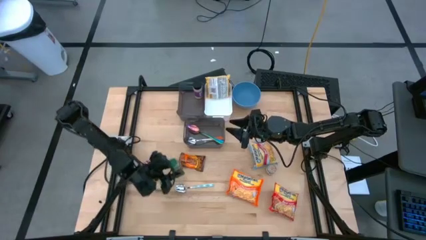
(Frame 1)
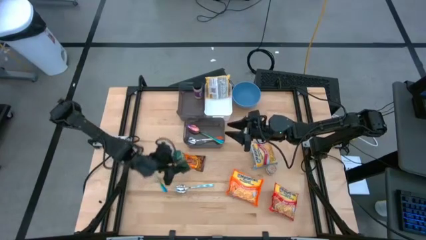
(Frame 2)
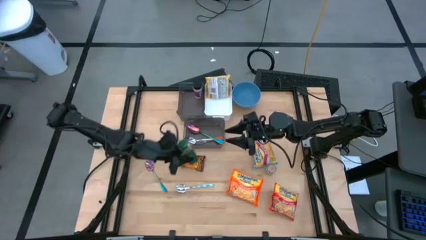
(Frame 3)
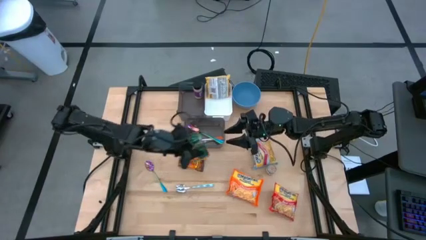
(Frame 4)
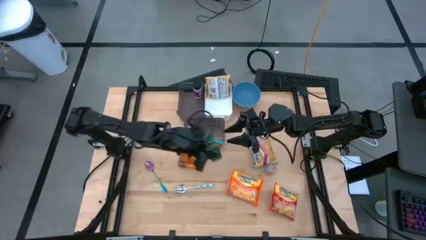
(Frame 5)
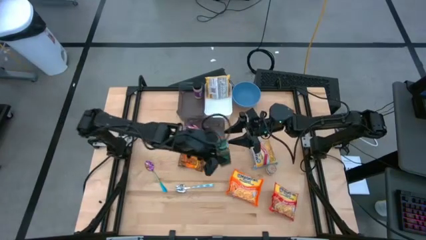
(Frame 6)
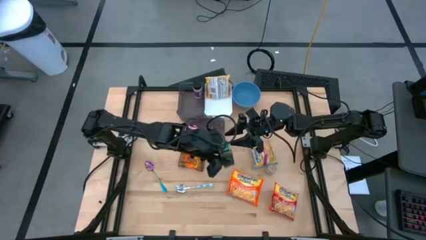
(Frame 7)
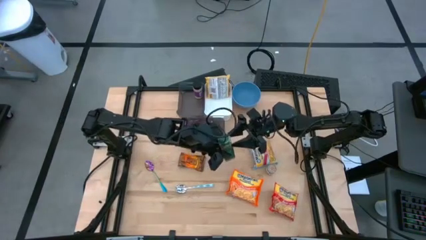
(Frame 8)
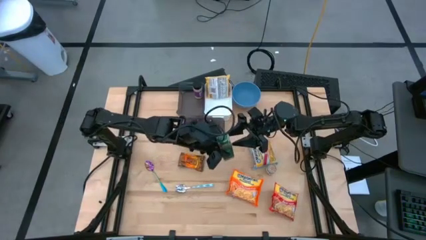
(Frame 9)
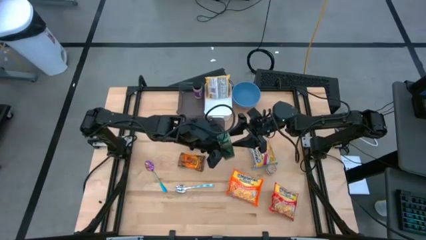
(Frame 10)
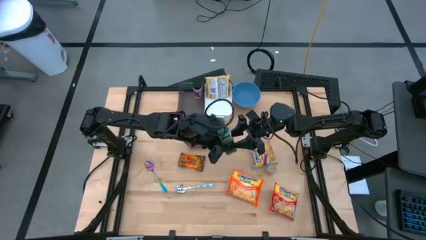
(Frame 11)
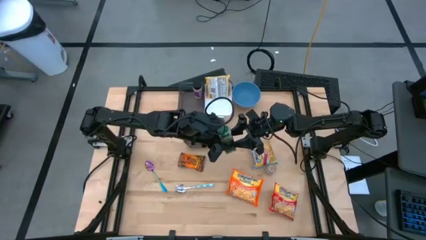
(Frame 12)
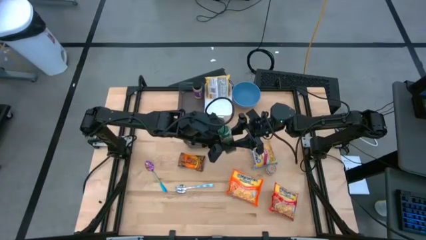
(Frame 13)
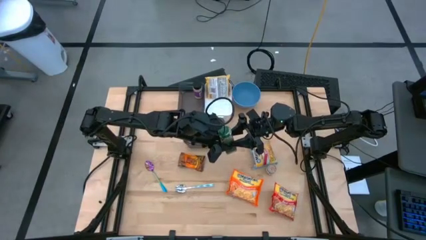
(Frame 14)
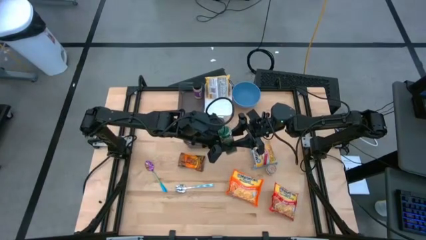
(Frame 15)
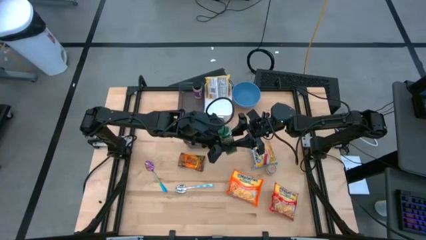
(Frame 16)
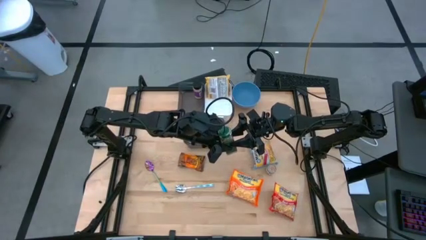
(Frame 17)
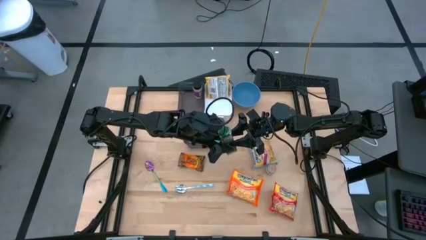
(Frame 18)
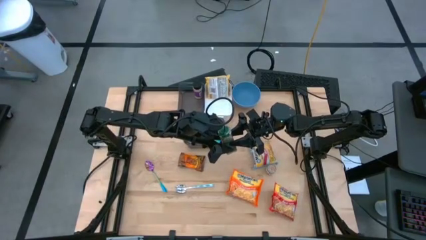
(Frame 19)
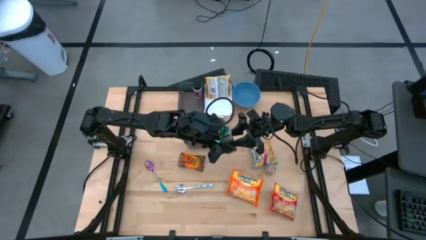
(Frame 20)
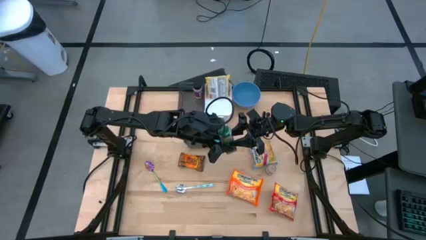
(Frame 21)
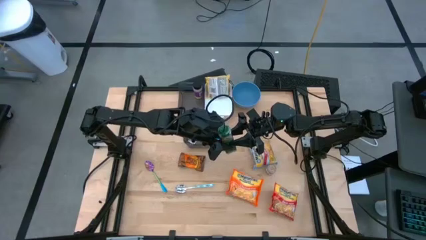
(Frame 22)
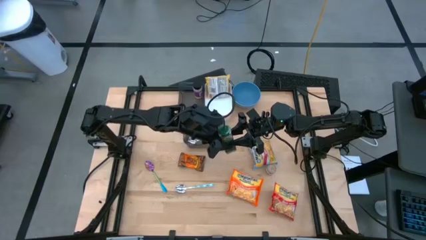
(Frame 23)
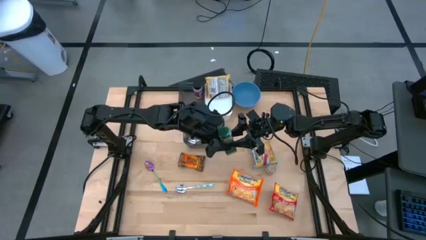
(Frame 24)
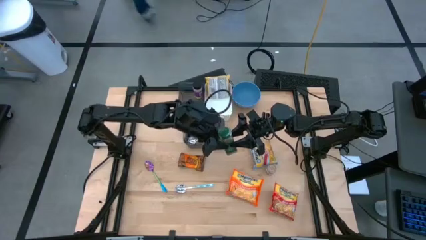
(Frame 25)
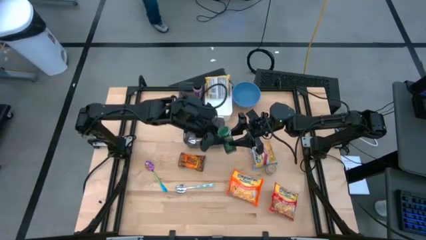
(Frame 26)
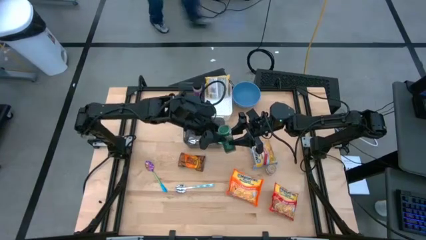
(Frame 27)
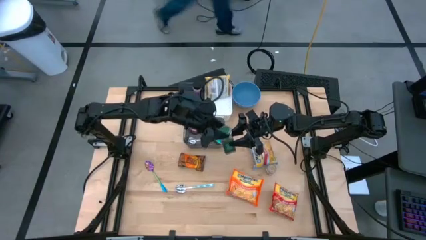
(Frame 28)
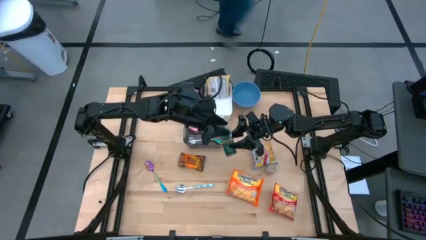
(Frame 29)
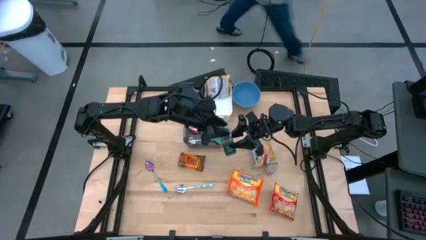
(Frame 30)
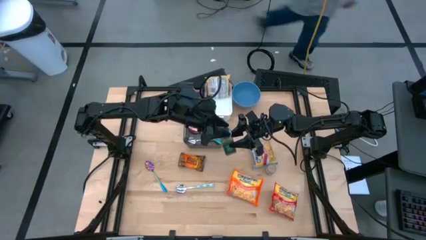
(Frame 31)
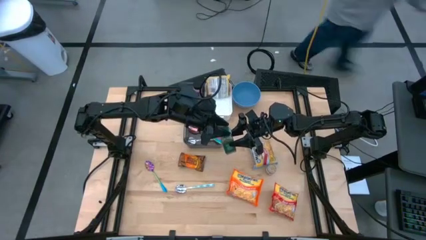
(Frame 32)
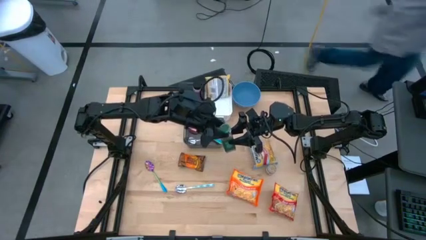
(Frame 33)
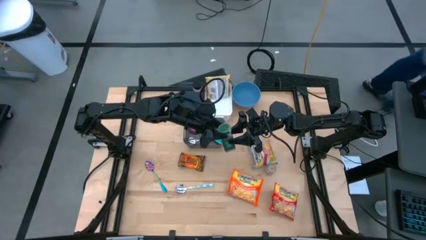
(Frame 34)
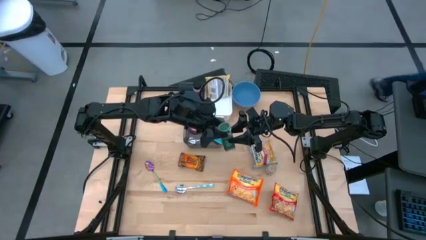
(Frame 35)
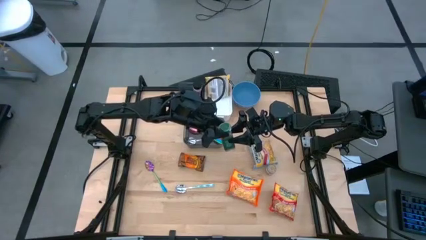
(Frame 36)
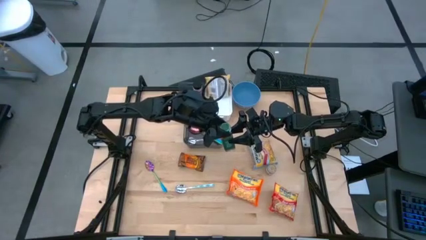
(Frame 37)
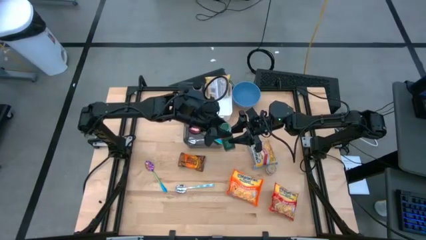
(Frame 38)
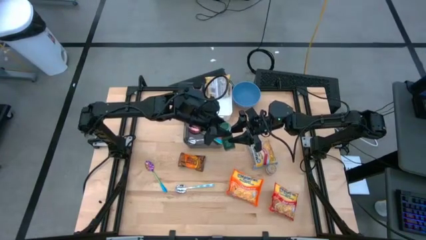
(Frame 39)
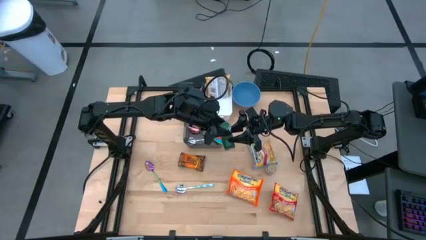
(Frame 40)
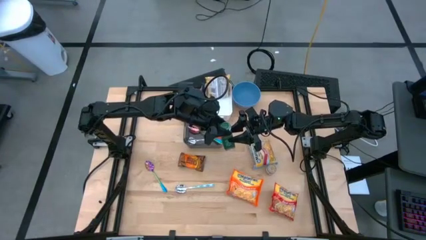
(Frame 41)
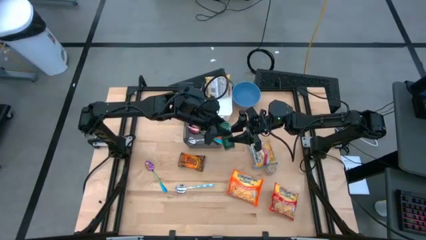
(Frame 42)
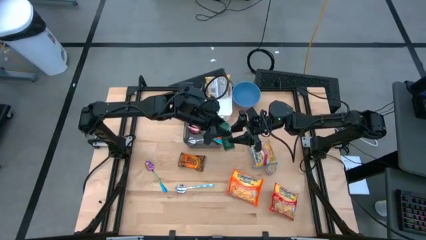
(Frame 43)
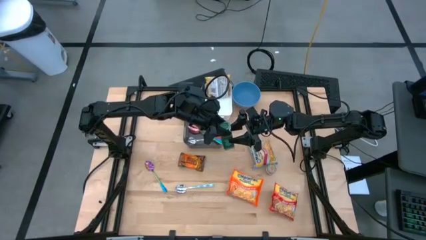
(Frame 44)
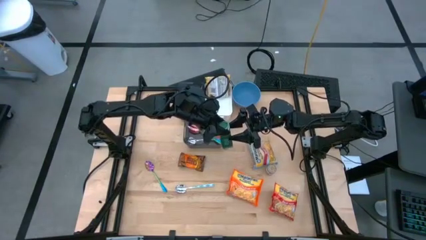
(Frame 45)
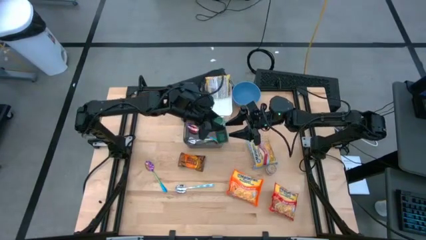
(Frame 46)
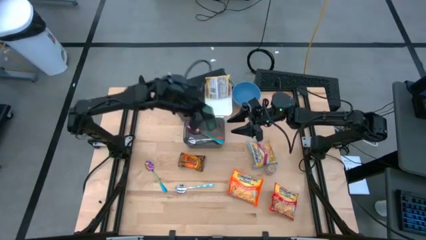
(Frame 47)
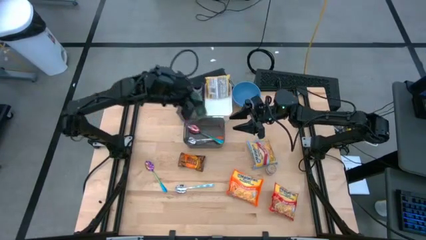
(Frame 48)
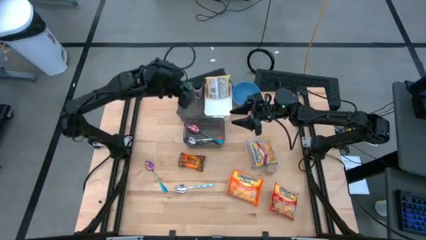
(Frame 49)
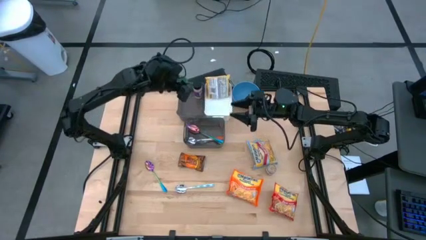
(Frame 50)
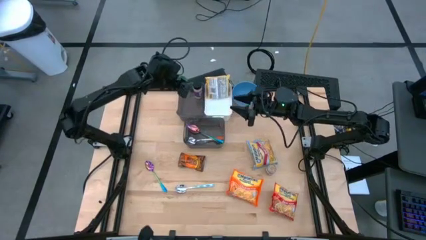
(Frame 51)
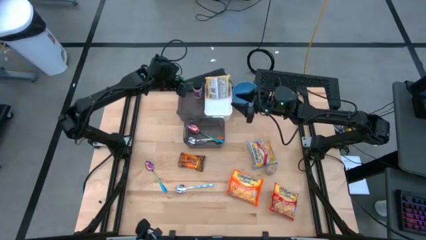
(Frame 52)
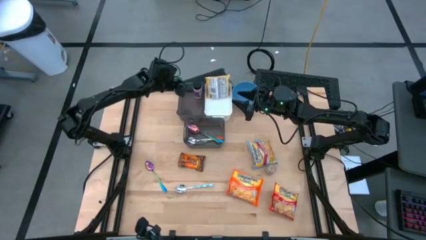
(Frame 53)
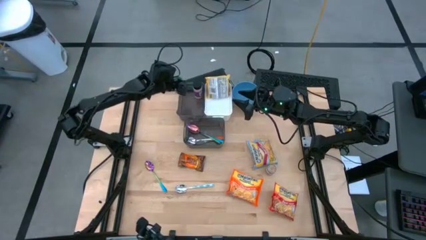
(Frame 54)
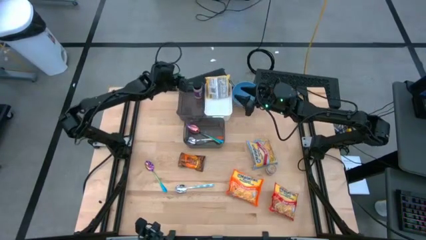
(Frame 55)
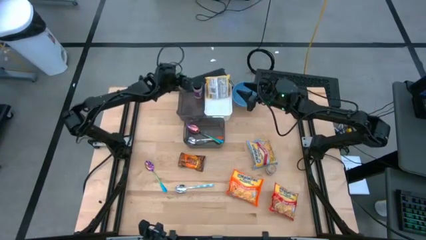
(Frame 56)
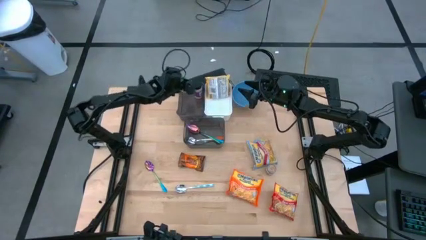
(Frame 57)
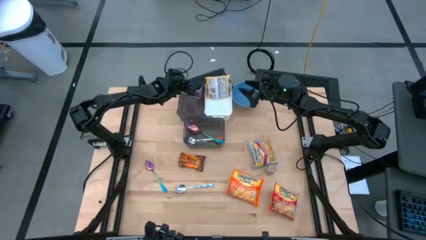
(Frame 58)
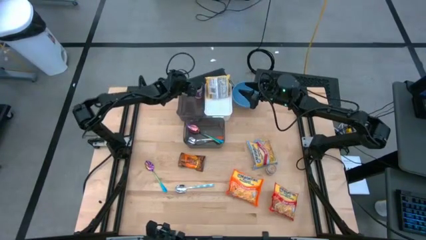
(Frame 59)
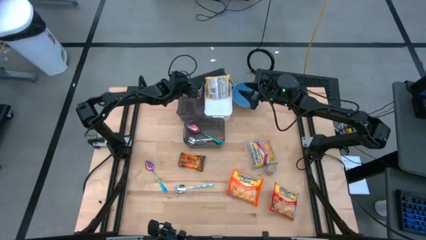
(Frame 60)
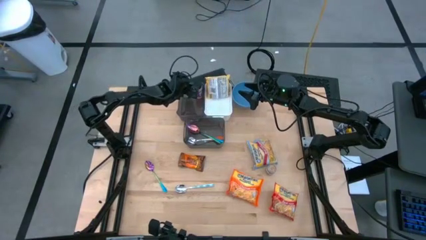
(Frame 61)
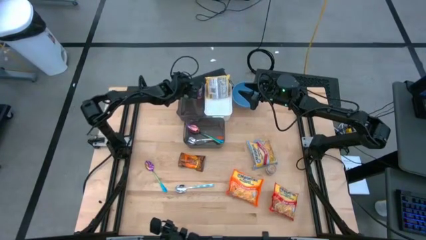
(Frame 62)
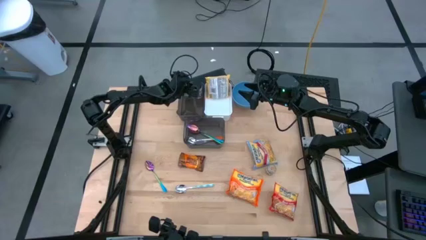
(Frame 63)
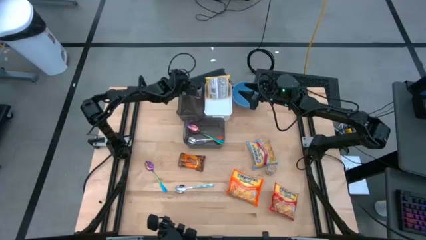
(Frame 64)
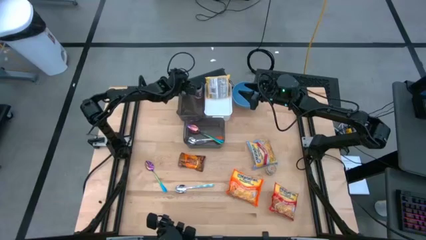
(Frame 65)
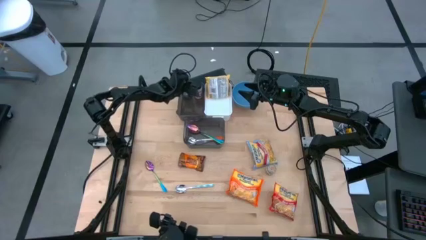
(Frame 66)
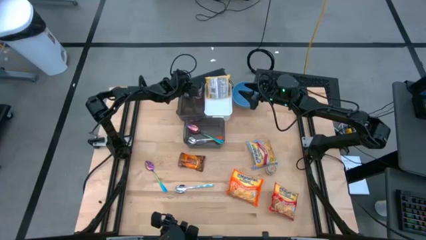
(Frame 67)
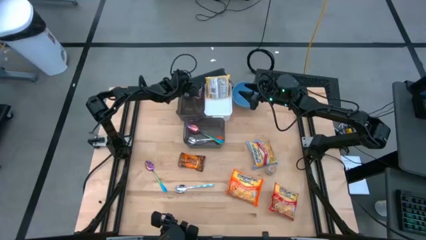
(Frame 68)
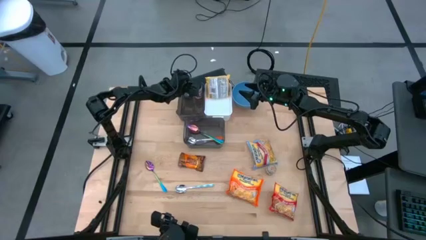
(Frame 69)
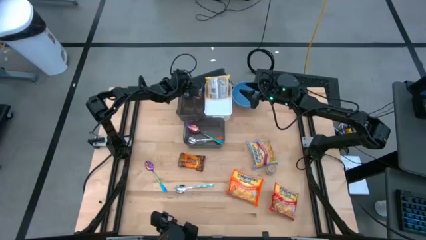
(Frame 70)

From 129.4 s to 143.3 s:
Task: Pick & Place Food Item
Put the green seasoning bottle into the top black bin
